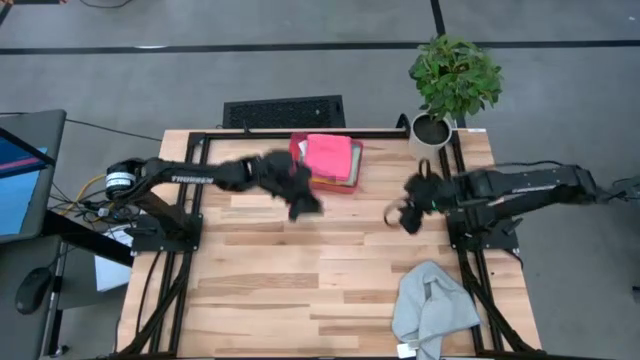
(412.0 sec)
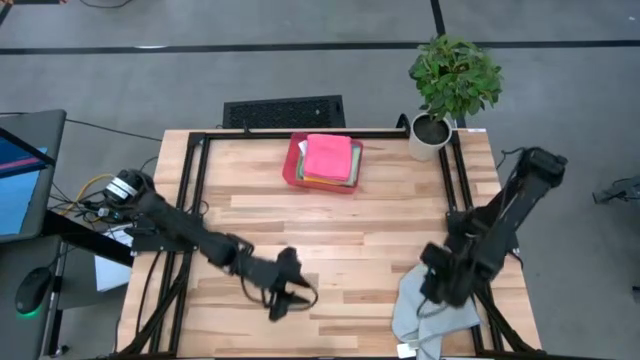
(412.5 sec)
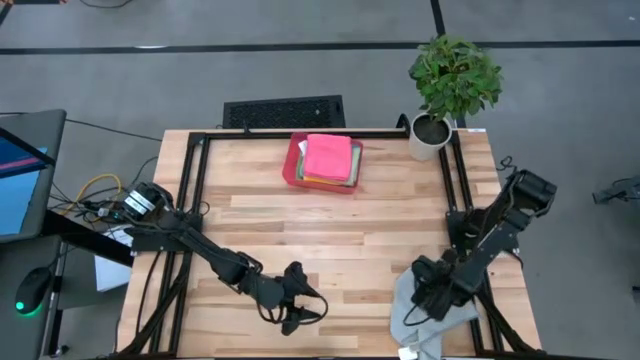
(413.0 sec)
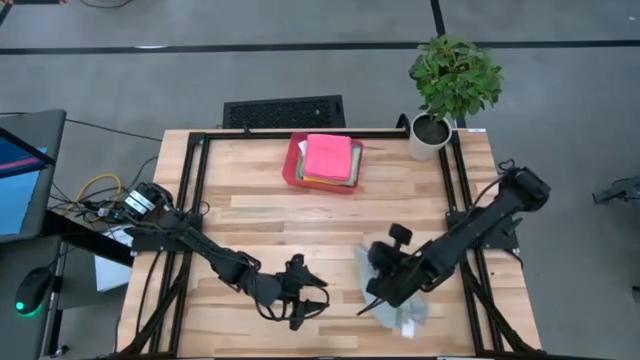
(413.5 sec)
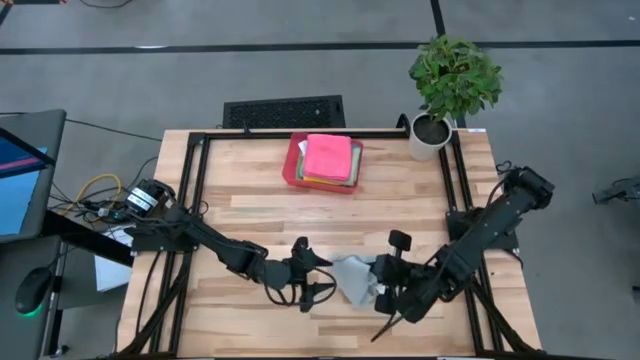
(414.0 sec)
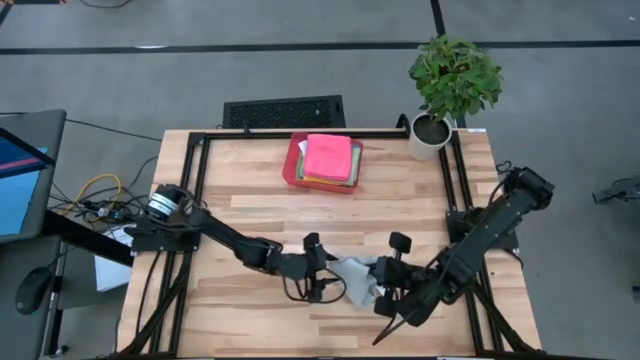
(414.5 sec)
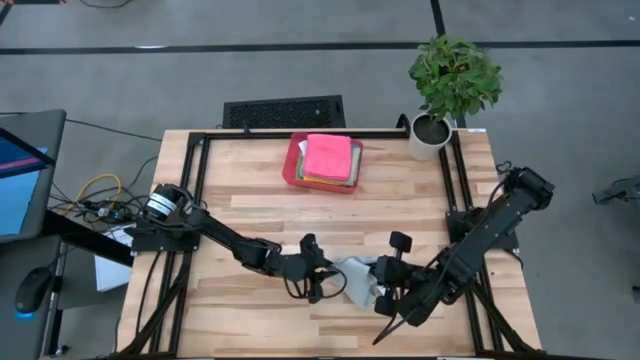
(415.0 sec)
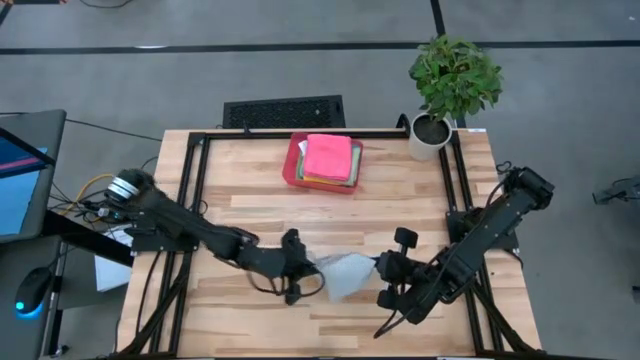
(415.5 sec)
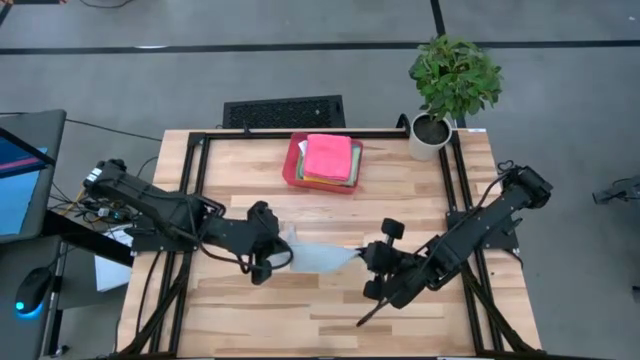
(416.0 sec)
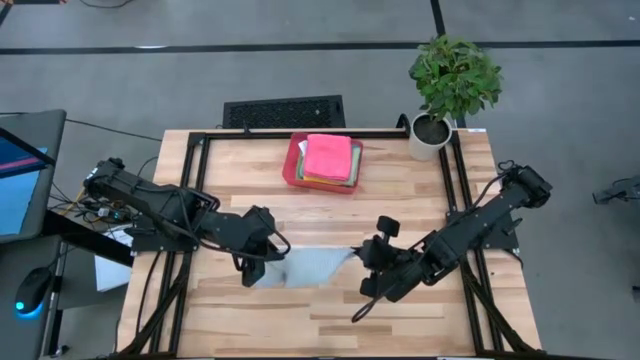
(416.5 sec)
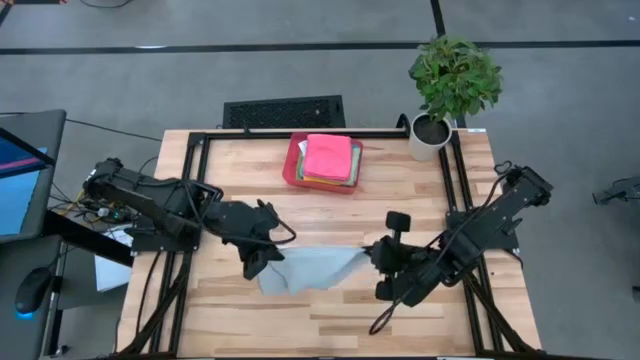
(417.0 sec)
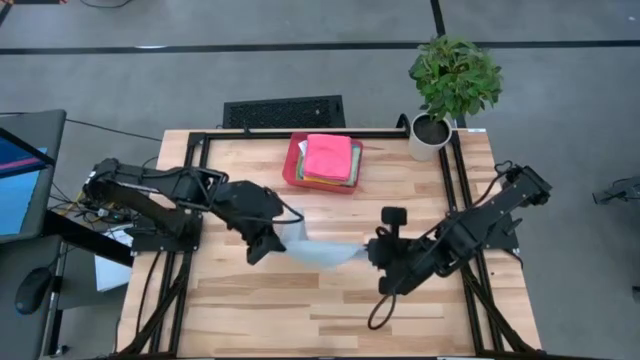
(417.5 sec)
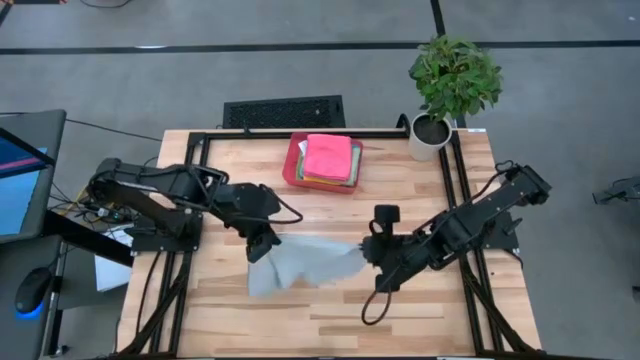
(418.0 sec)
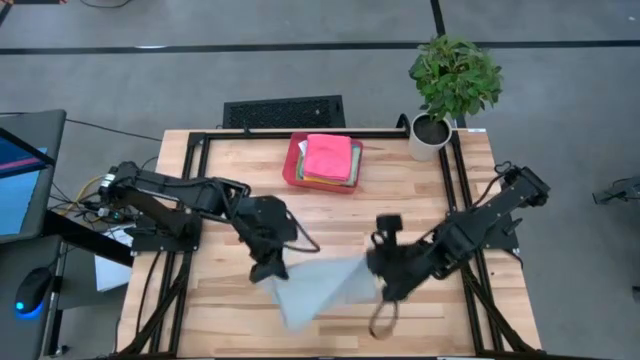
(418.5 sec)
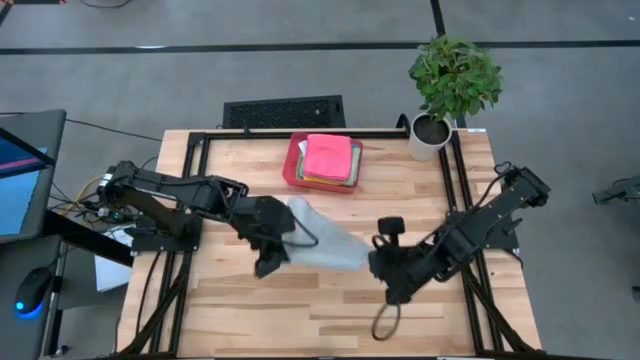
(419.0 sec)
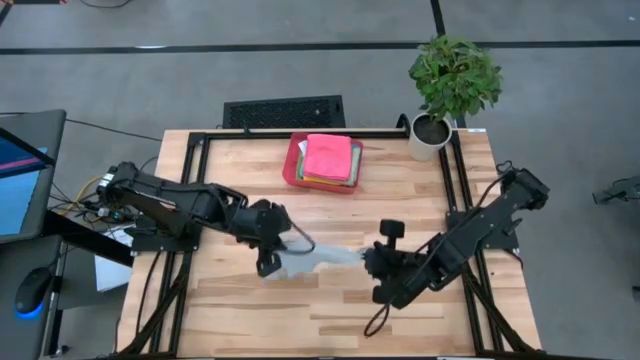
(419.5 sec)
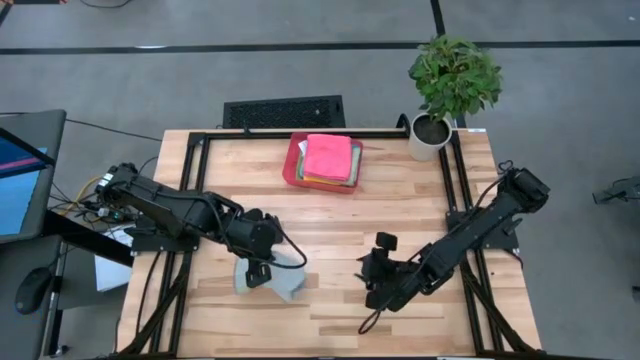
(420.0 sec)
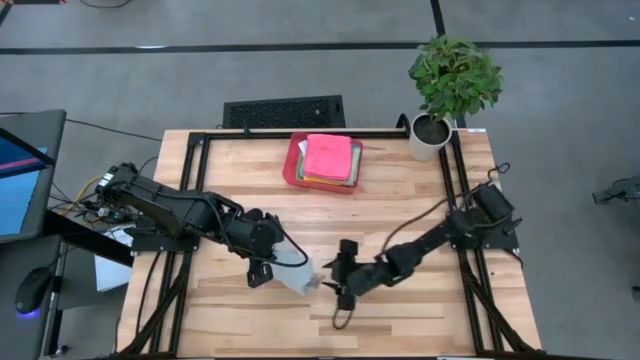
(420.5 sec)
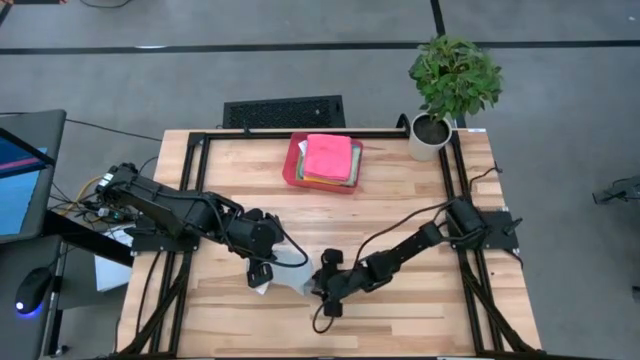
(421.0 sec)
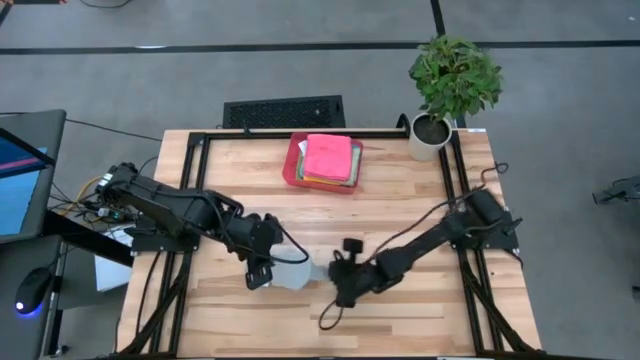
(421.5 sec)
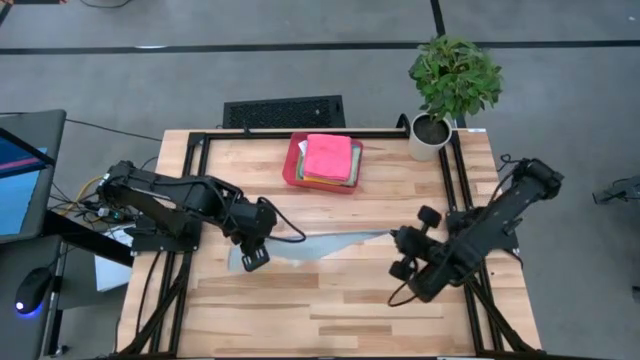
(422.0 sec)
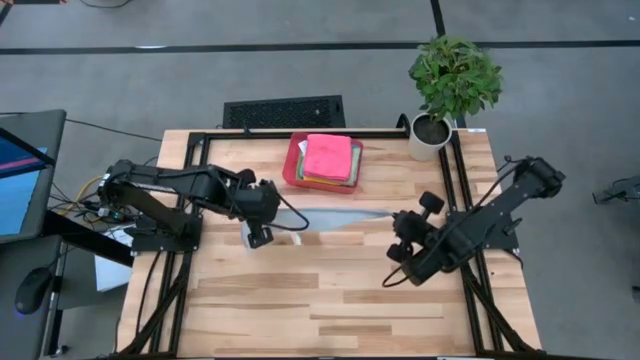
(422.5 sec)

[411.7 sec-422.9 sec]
Task: Fold microfiber towels
Fold the gray microfiber cloth

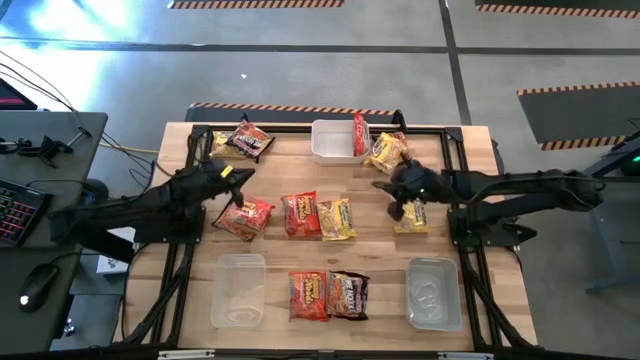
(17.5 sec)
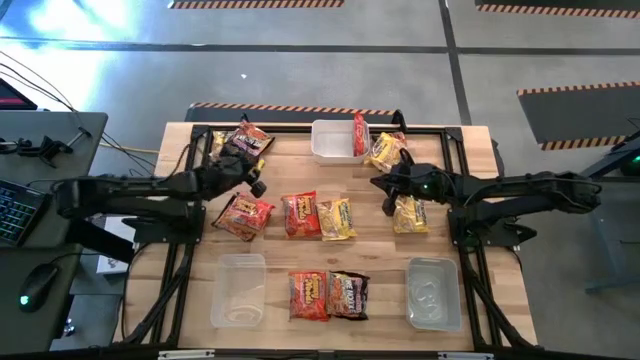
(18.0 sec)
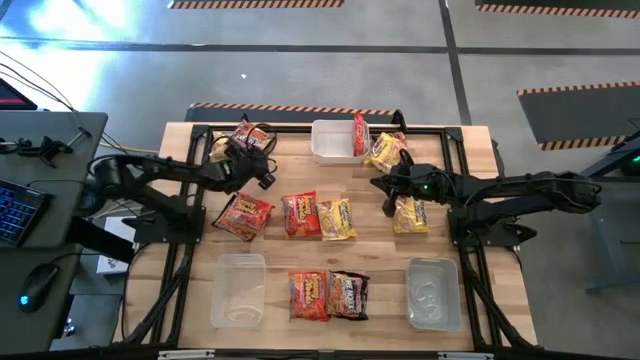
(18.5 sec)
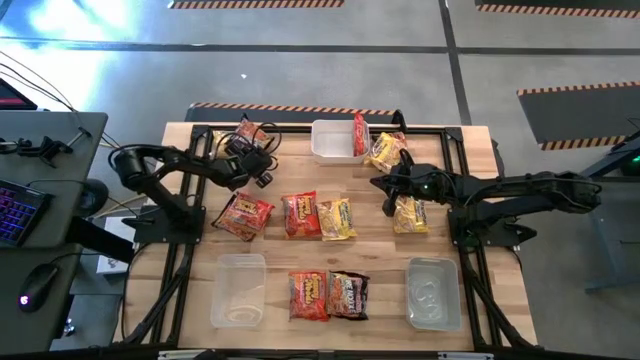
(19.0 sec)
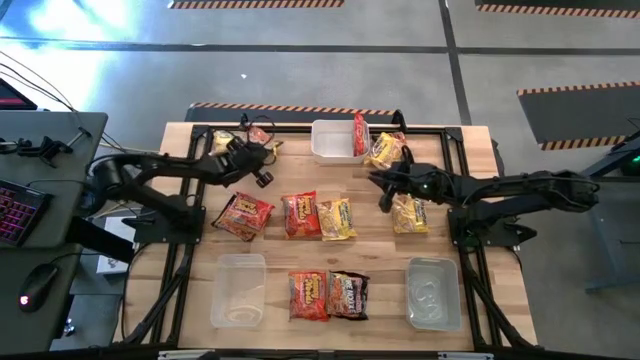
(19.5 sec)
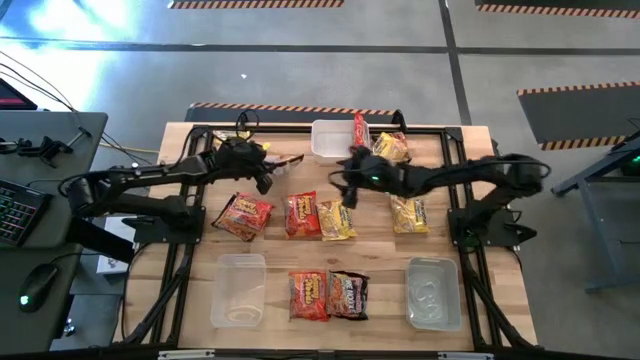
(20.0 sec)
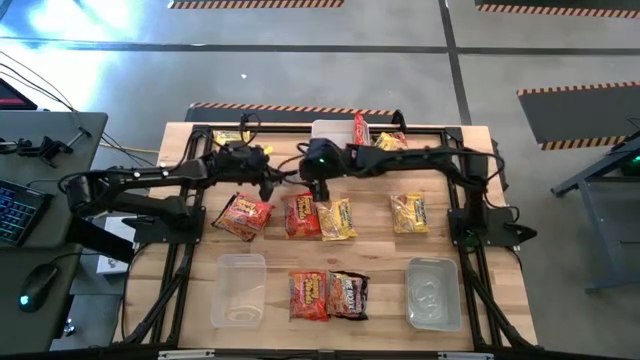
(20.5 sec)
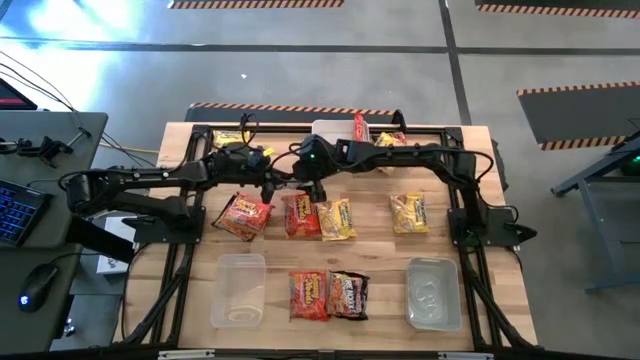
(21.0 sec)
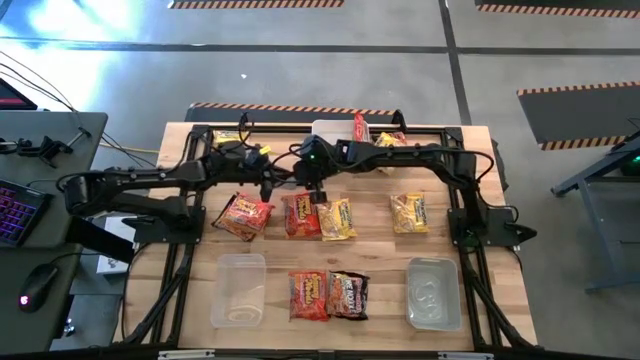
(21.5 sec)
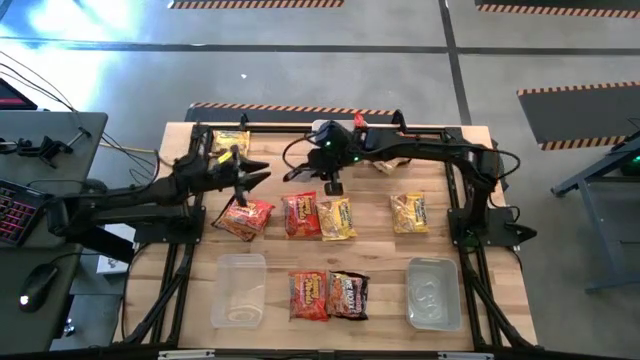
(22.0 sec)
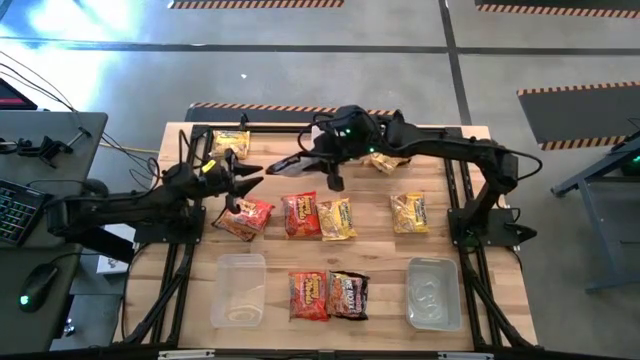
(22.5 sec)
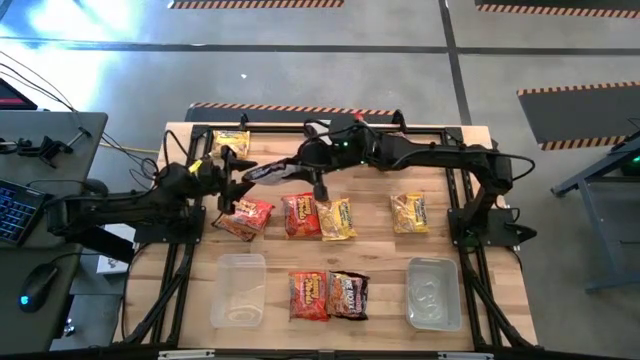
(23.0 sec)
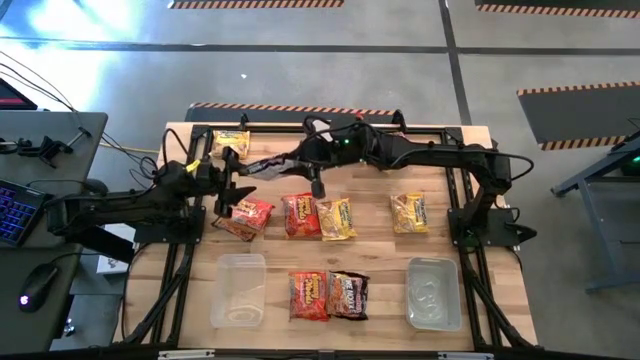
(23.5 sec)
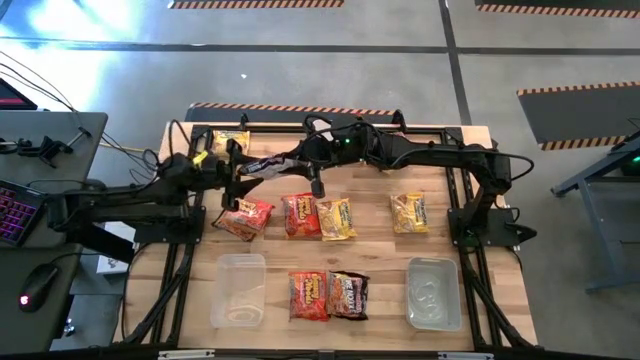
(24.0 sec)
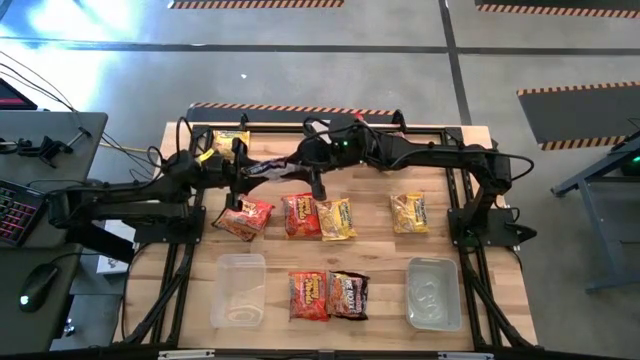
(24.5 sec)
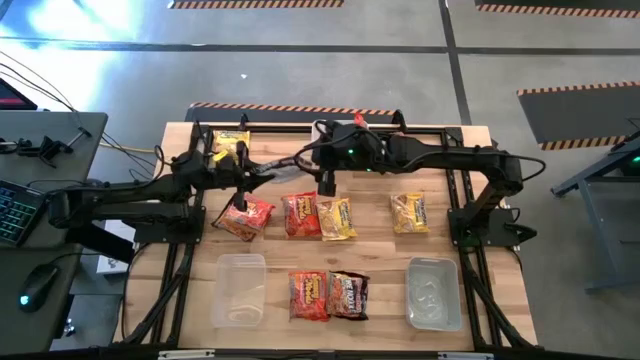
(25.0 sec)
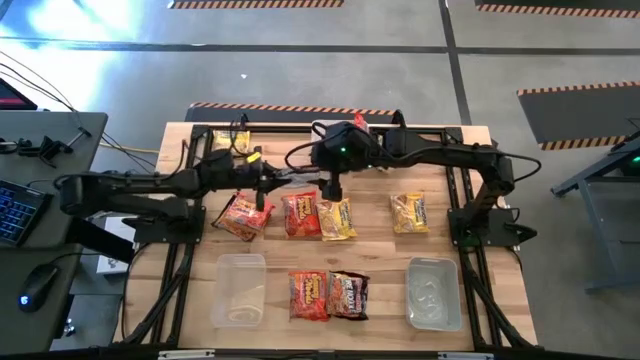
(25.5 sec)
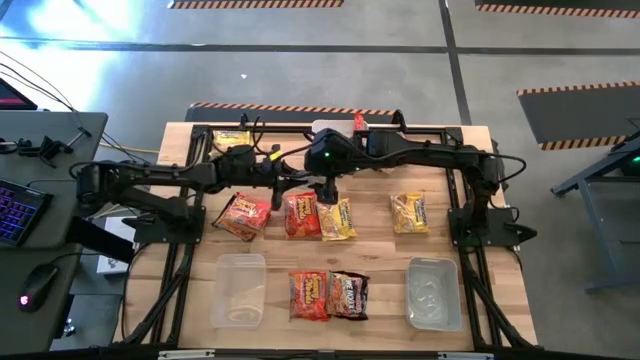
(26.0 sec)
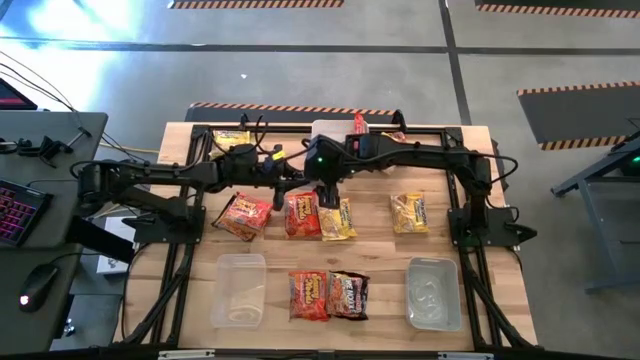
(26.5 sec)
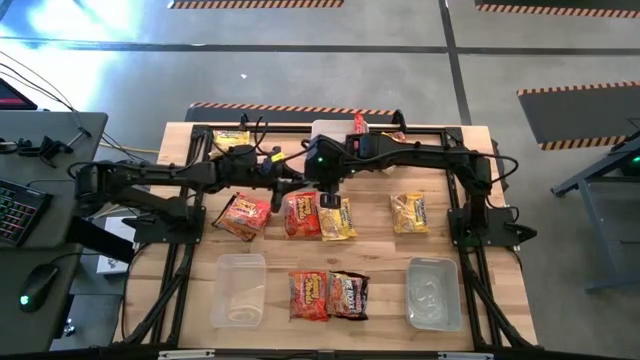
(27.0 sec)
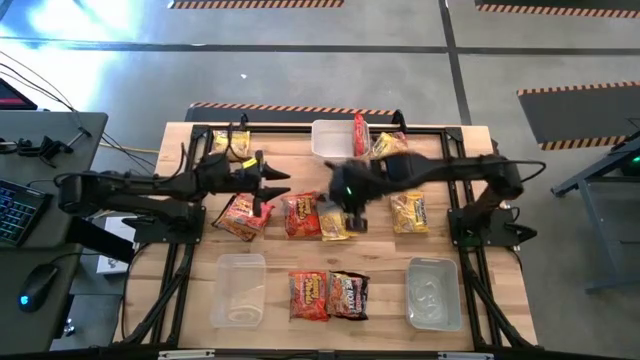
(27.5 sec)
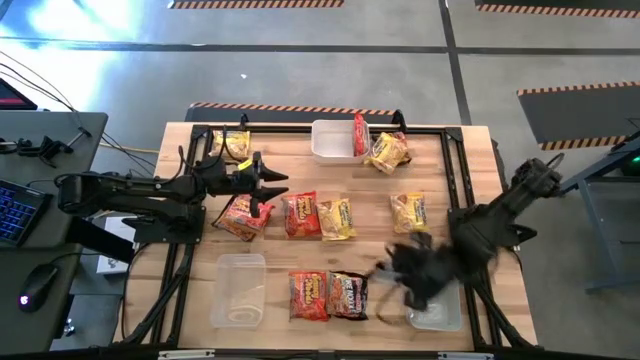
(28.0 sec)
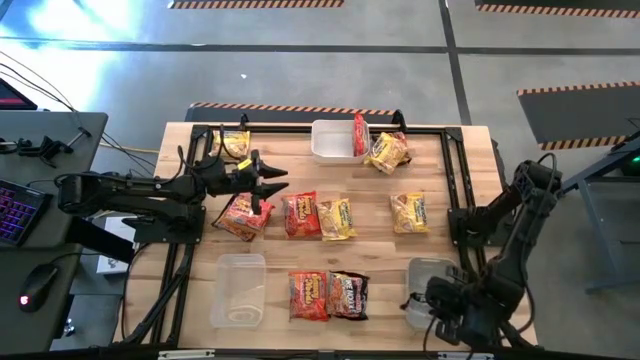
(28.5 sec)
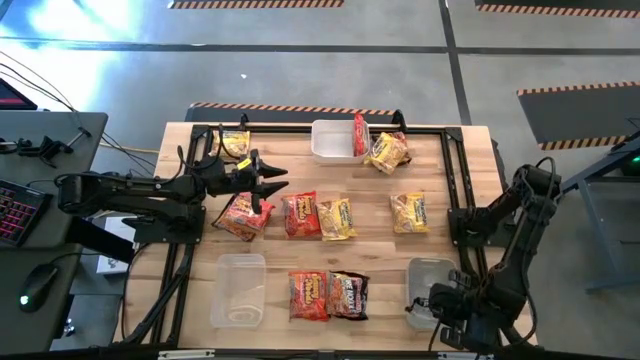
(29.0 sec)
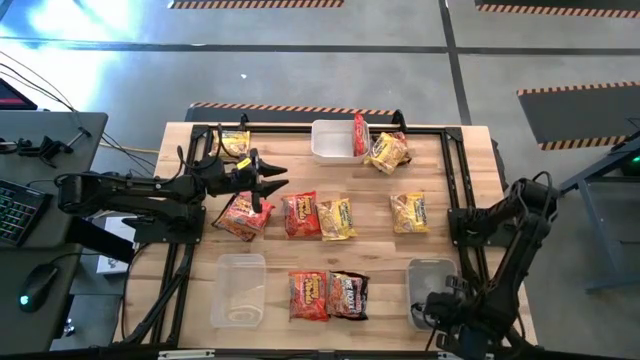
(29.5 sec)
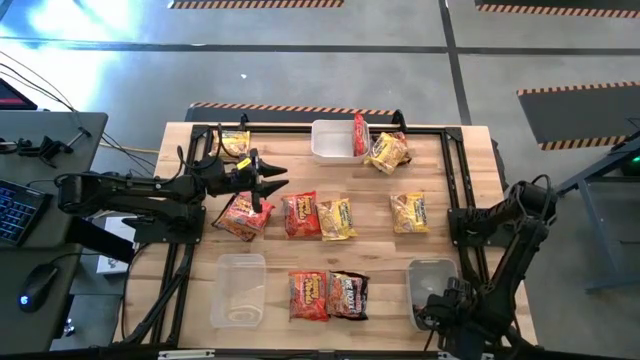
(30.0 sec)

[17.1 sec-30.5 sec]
Task: Sort Maruchan noodles
Put the black noodle pack into the gray bin
